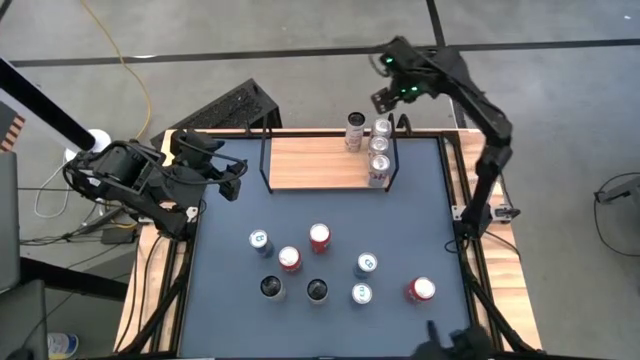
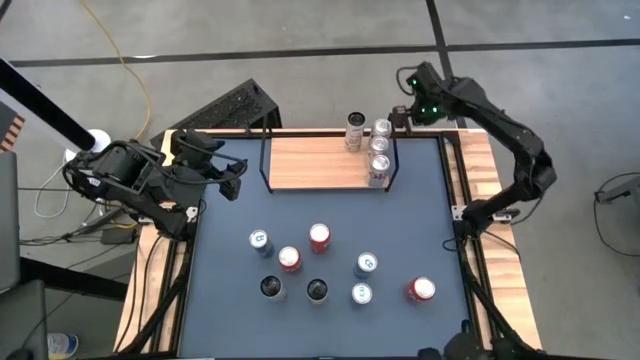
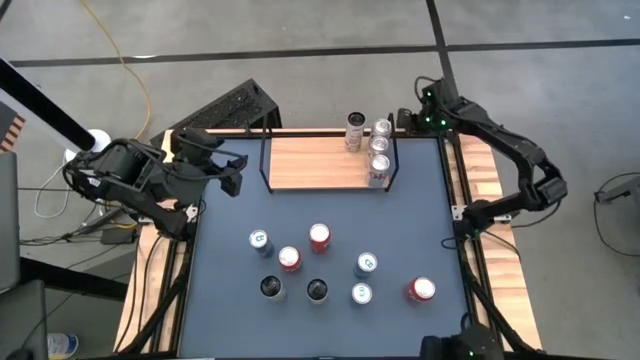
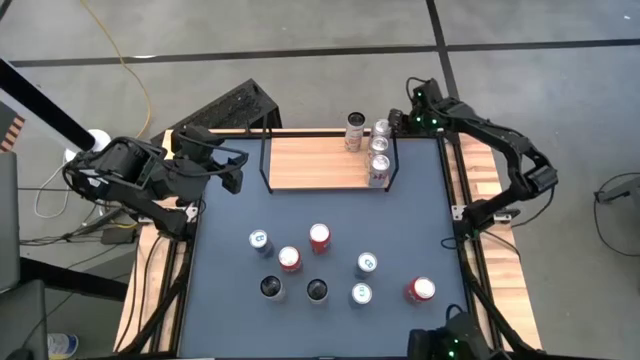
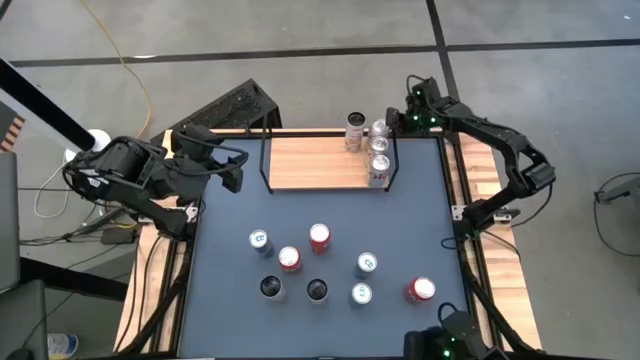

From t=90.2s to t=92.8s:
Task: Place canned beverage on shelf
Adjust the silver soda can on the shelf

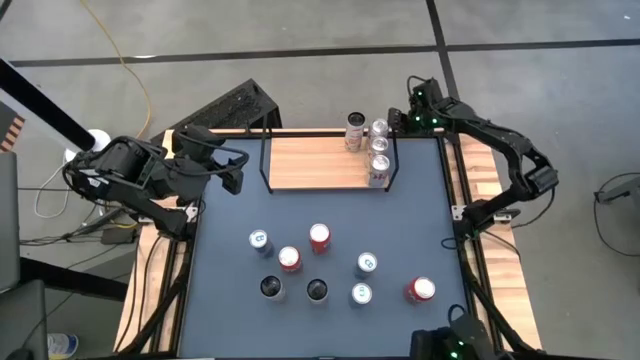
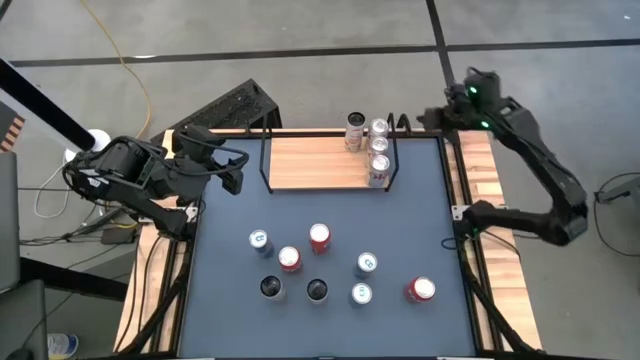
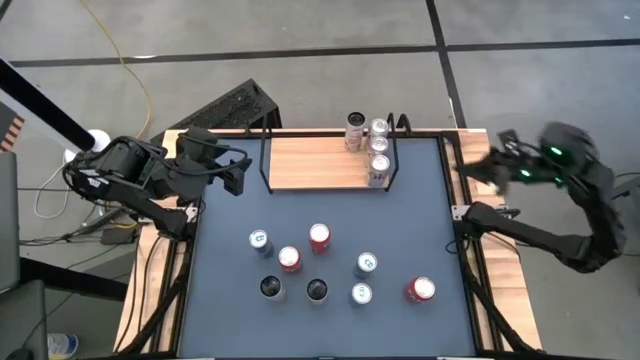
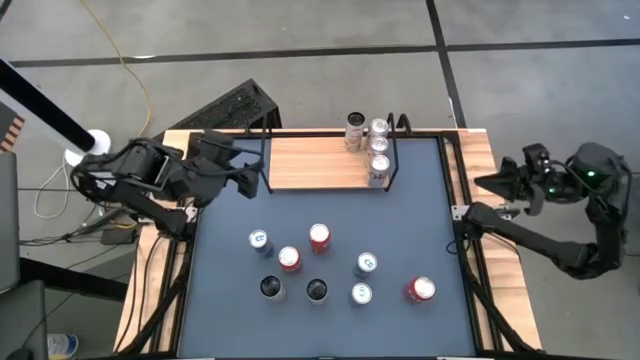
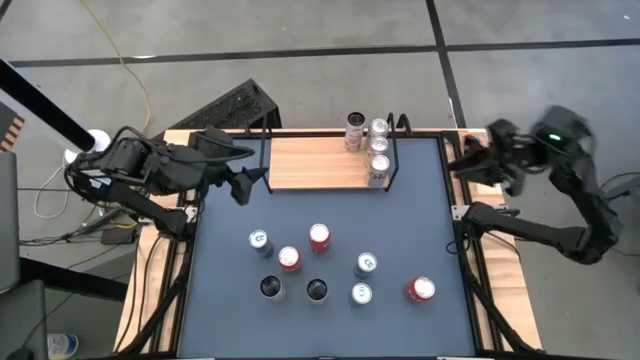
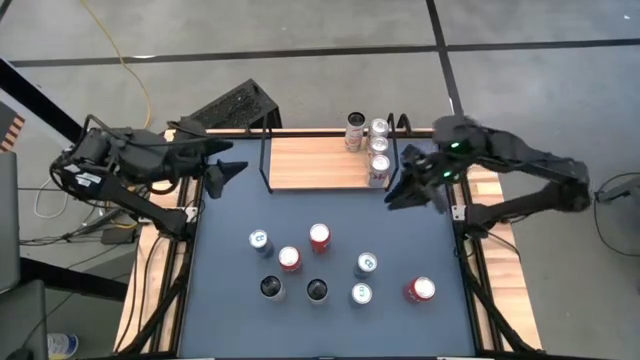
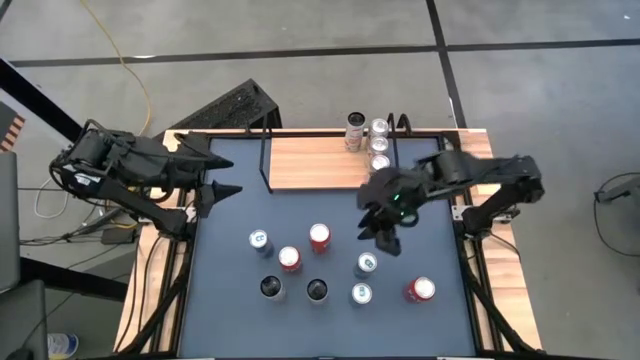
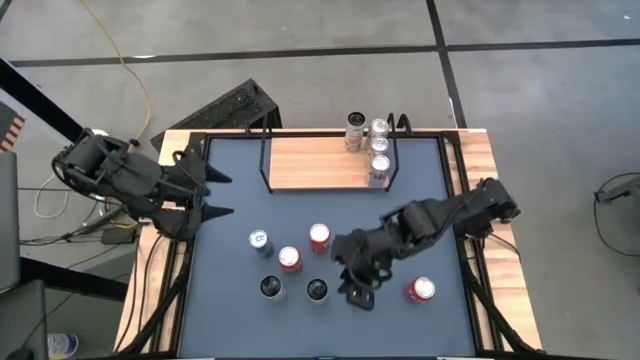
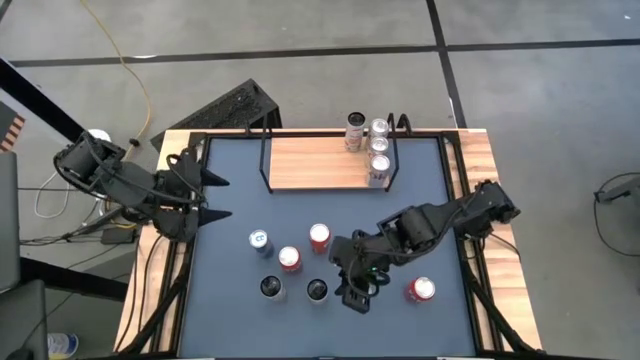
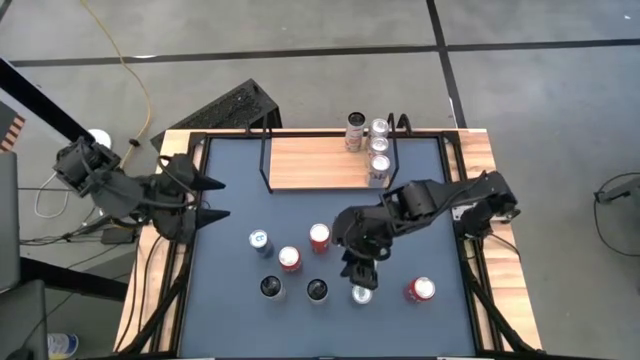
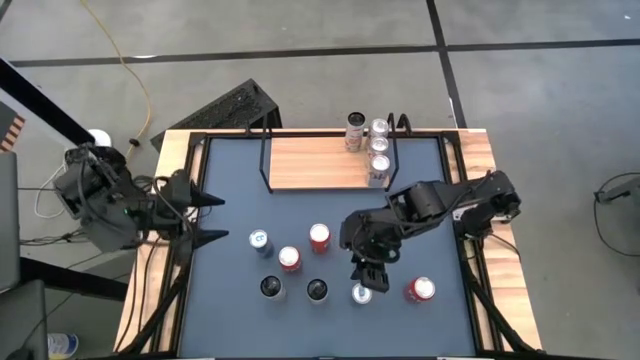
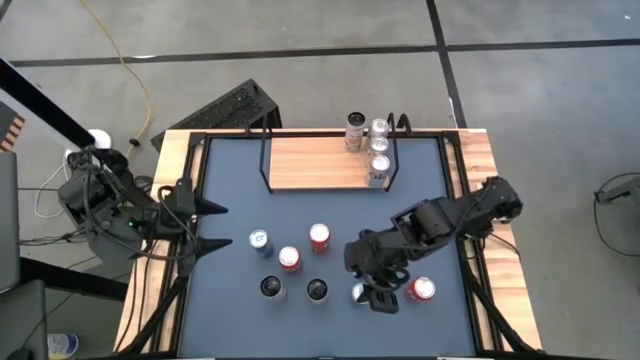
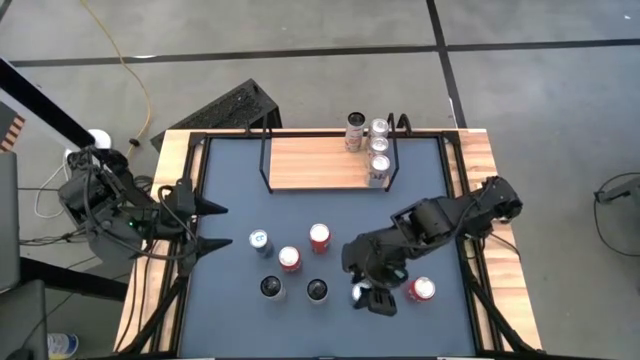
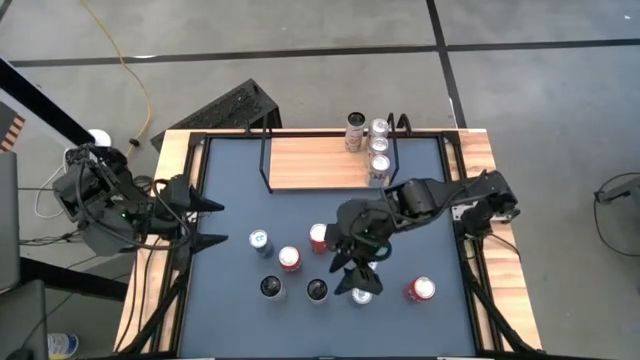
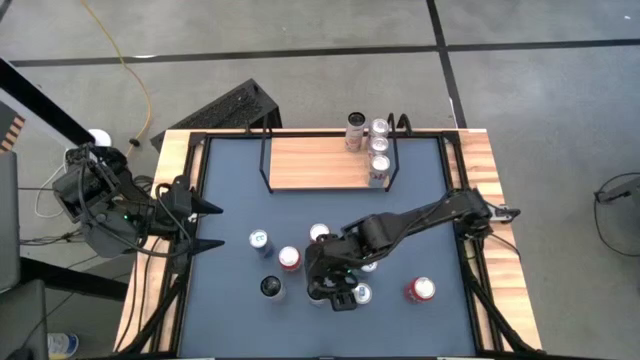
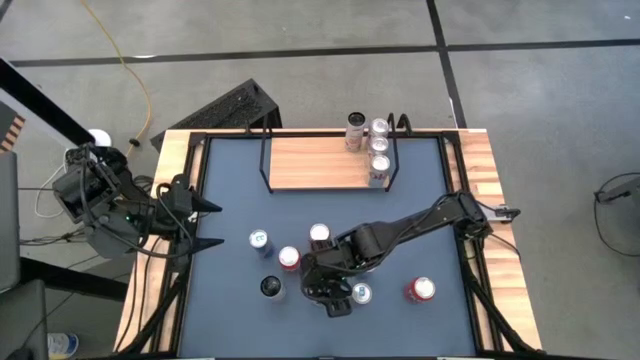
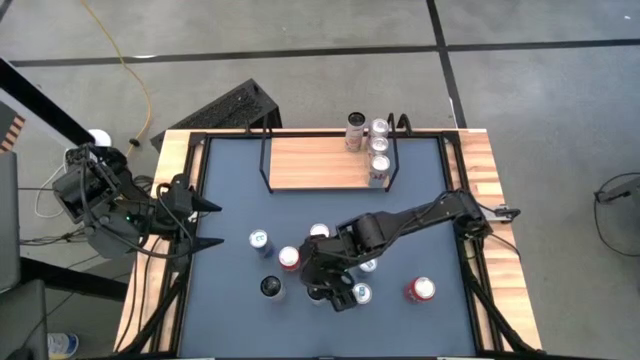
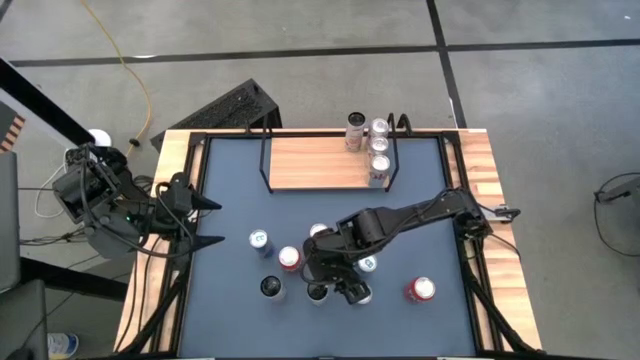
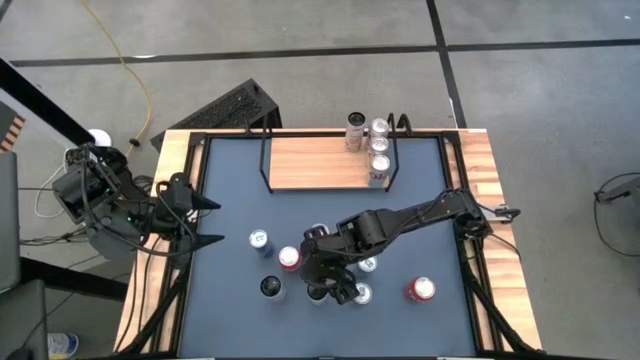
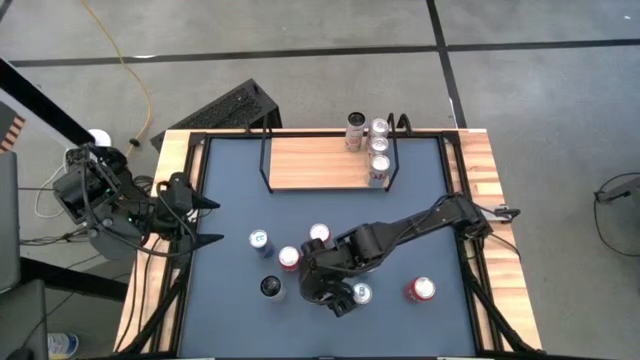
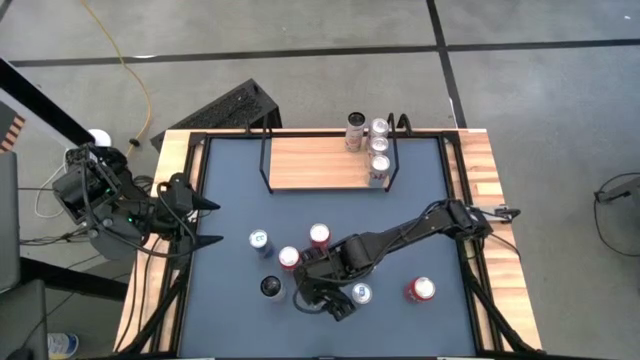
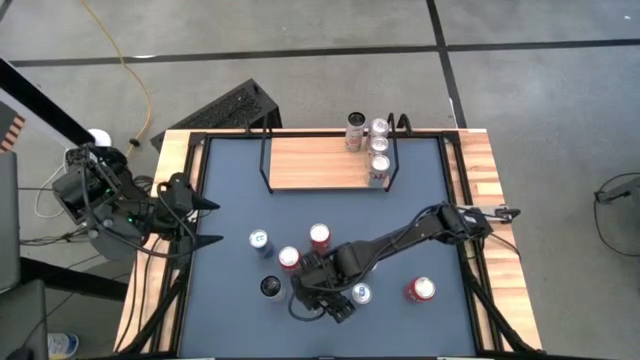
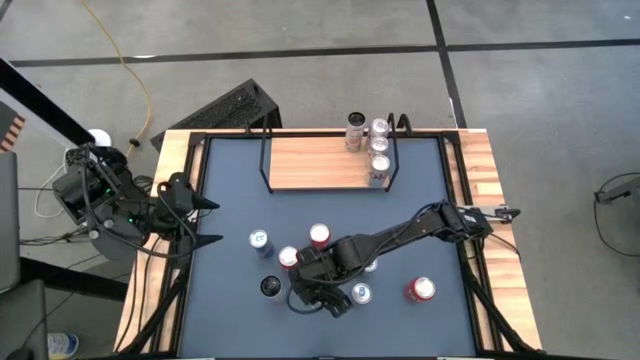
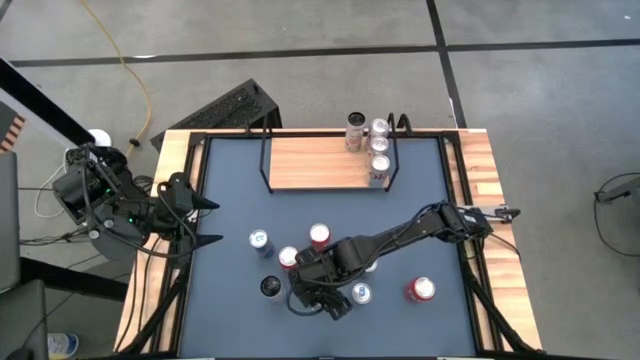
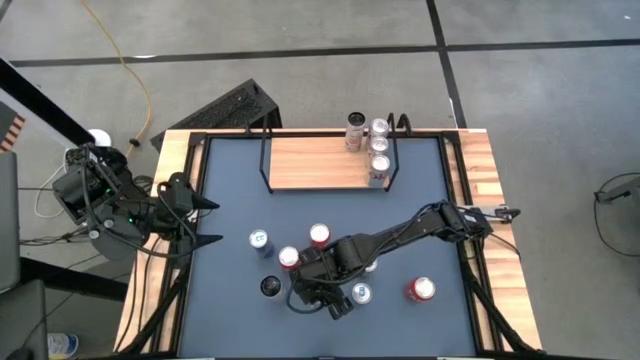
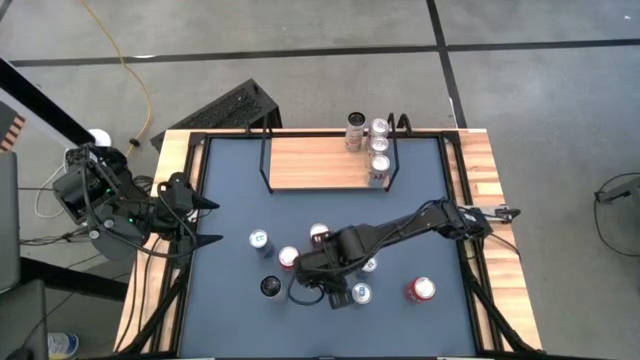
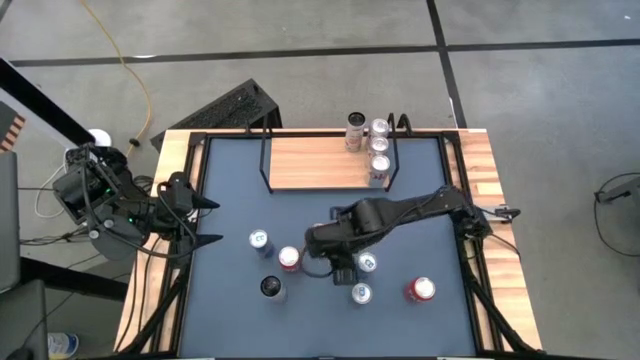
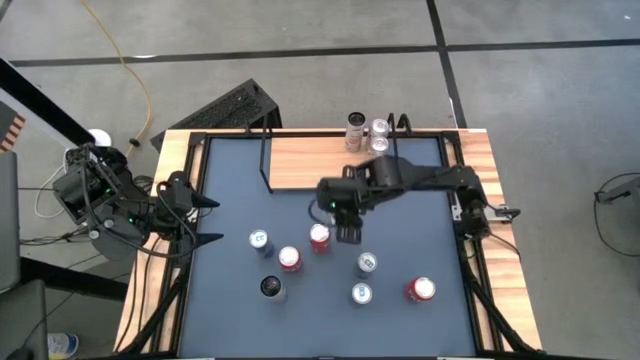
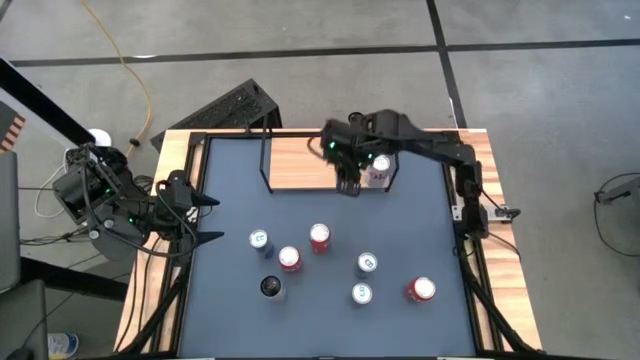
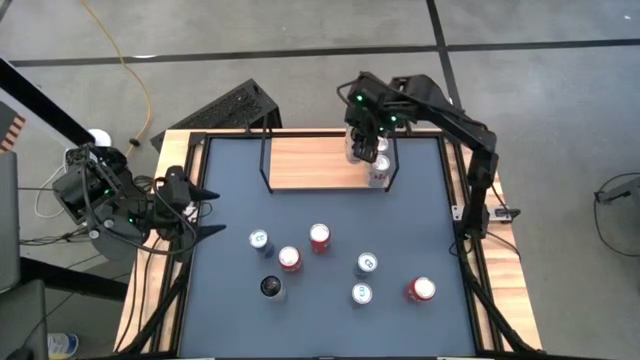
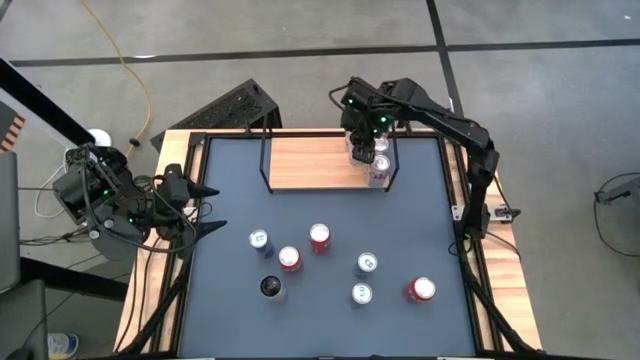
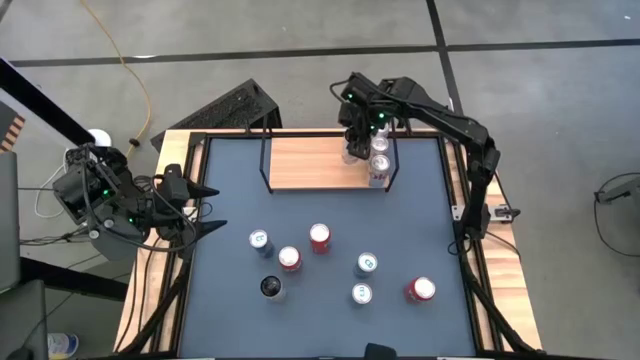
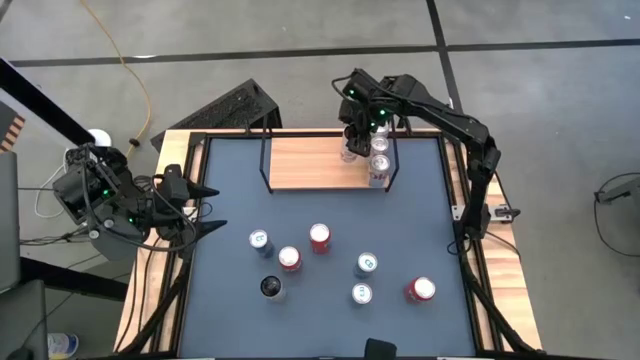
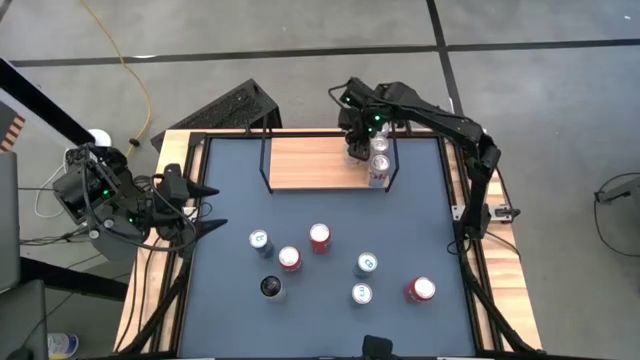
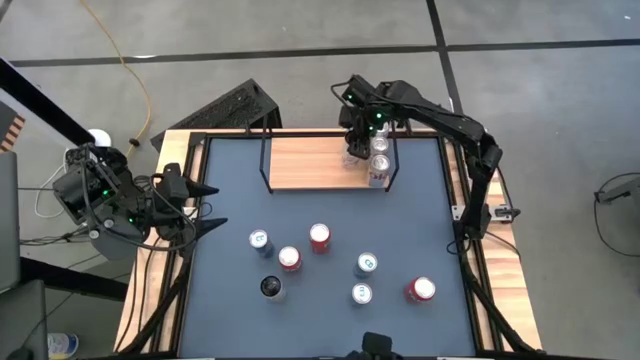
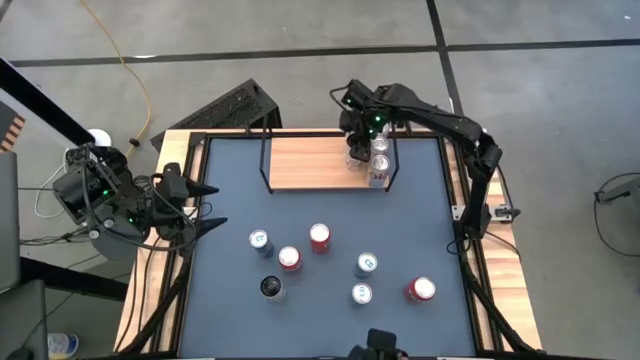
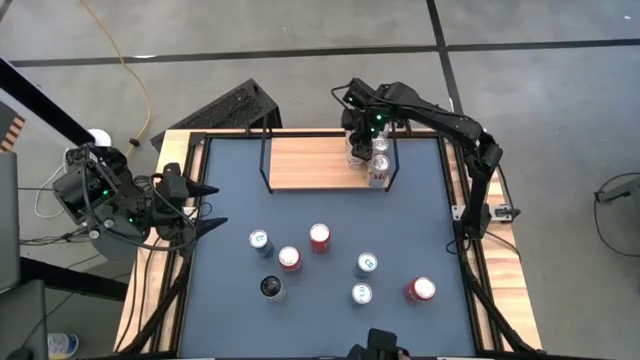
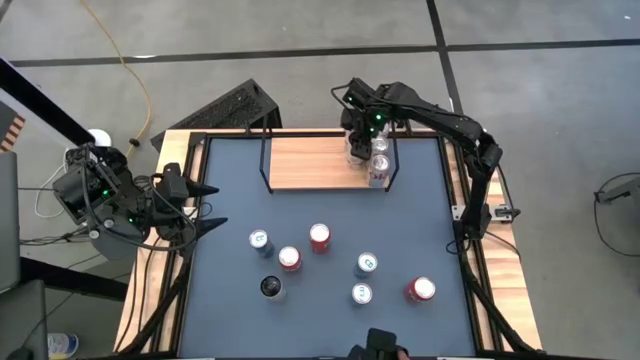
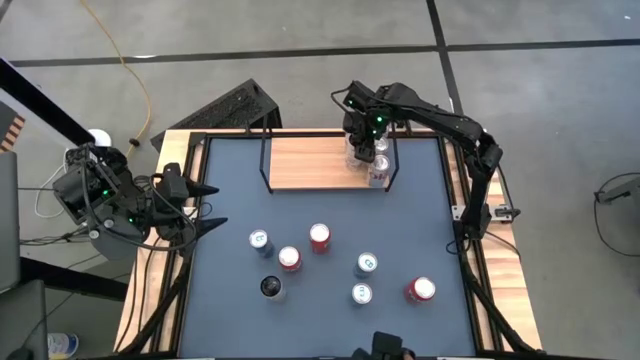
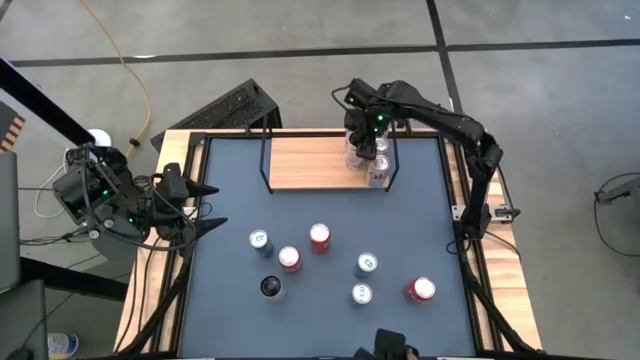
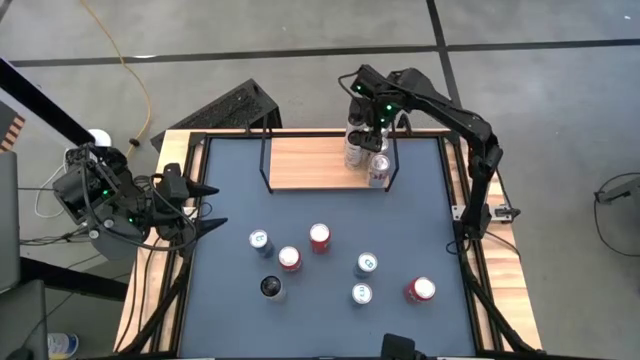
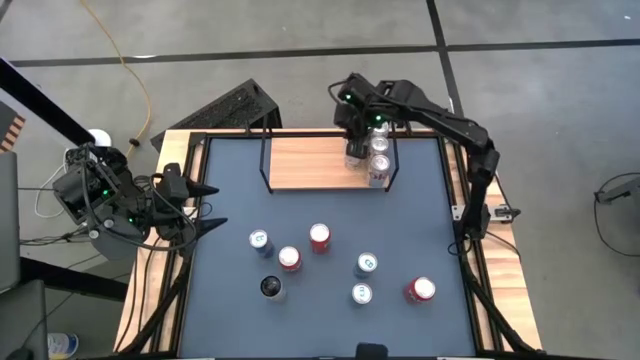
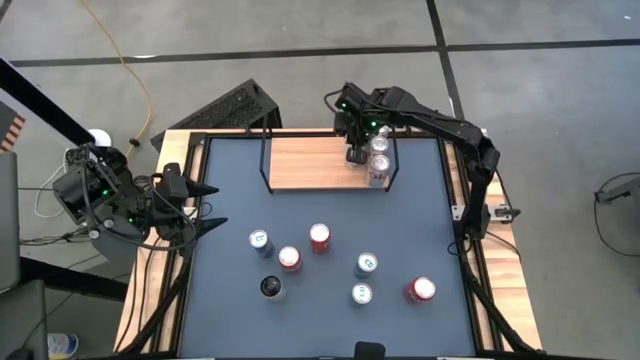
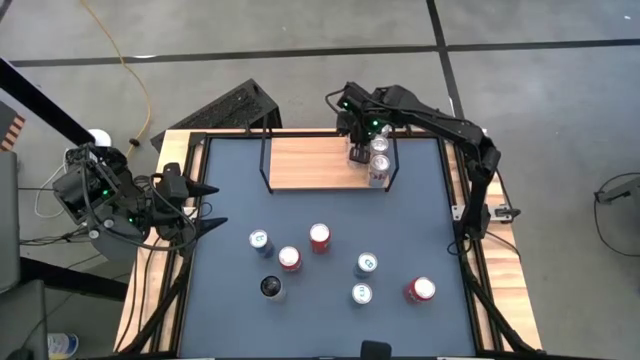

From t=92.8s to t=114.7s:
Put the white soda can on the shelf aligned with the other white soda can
